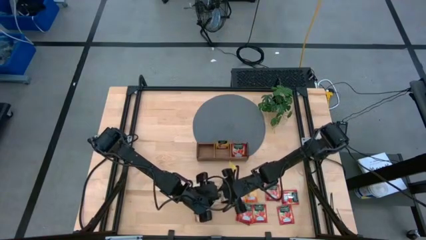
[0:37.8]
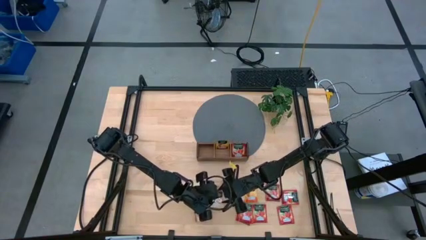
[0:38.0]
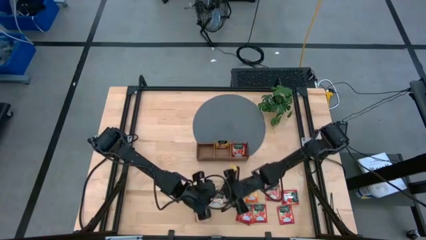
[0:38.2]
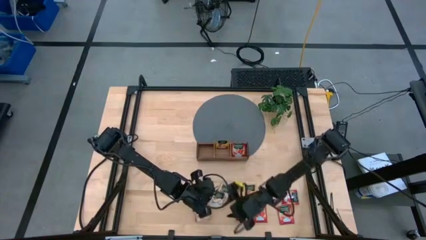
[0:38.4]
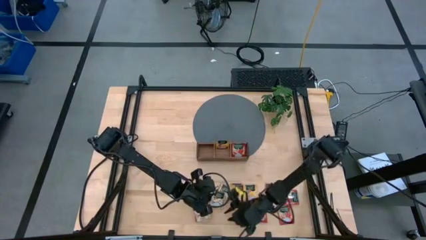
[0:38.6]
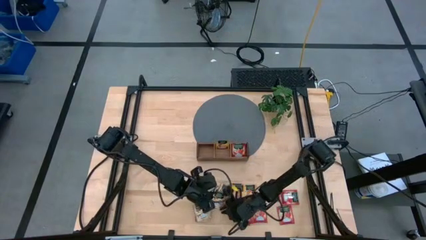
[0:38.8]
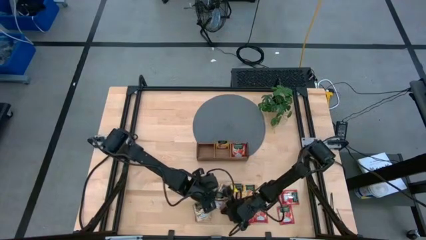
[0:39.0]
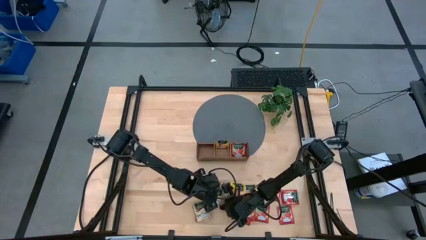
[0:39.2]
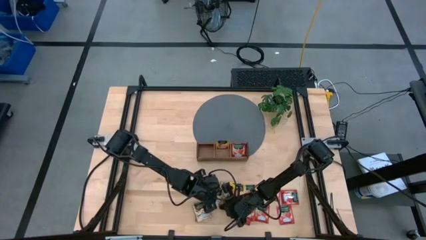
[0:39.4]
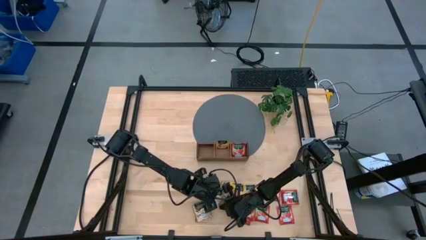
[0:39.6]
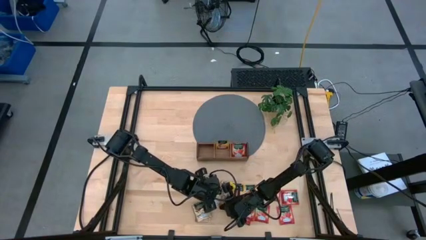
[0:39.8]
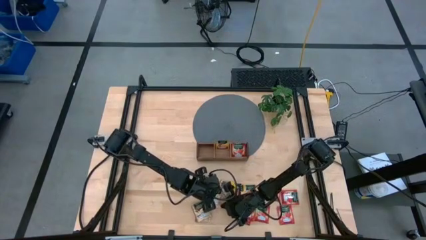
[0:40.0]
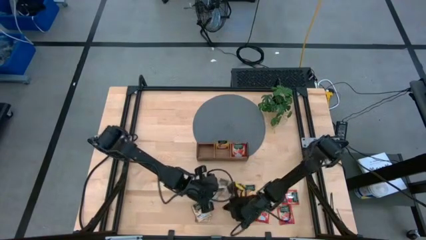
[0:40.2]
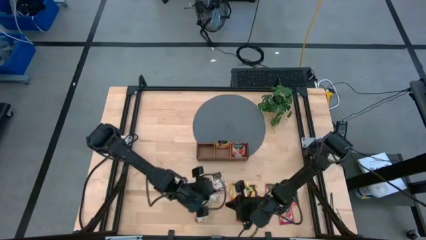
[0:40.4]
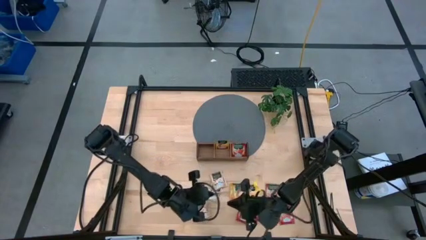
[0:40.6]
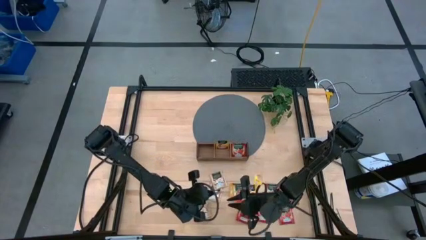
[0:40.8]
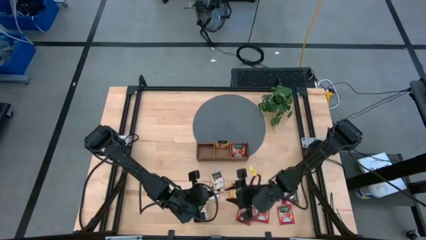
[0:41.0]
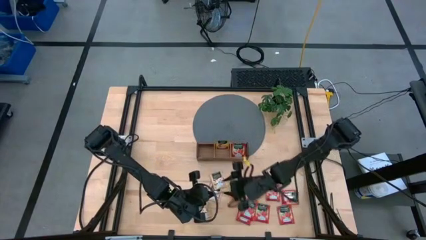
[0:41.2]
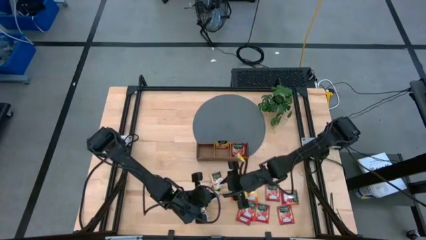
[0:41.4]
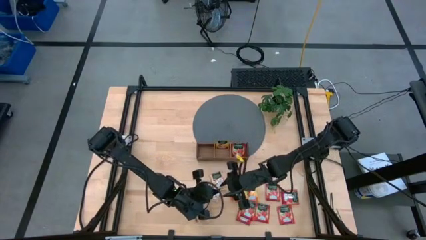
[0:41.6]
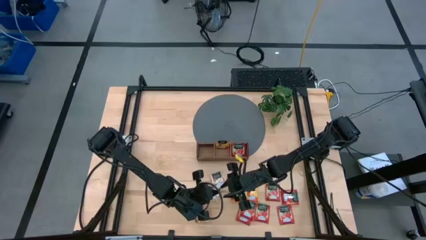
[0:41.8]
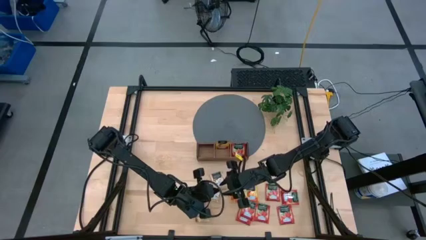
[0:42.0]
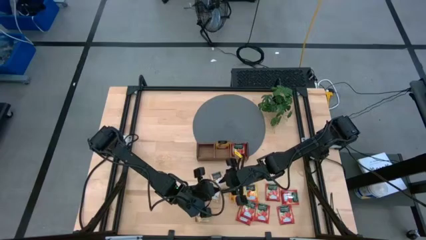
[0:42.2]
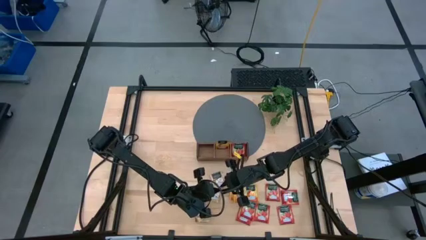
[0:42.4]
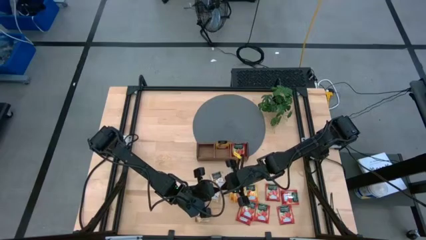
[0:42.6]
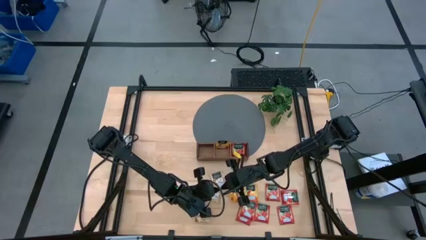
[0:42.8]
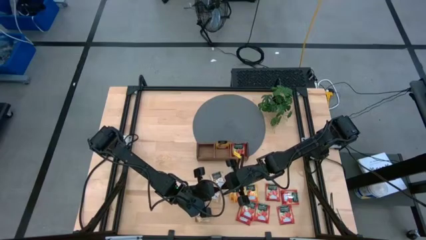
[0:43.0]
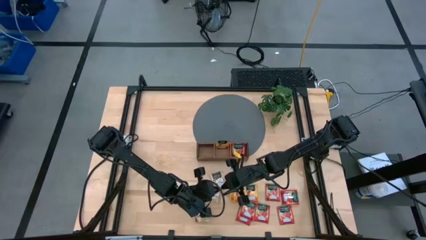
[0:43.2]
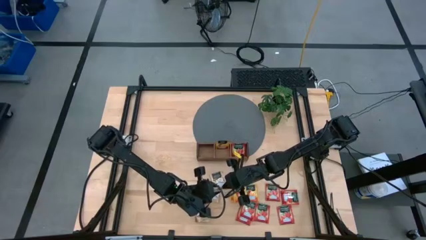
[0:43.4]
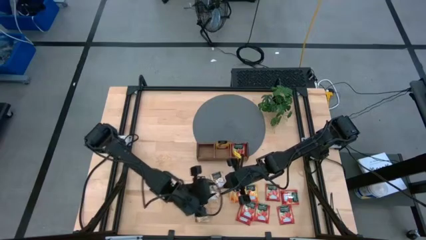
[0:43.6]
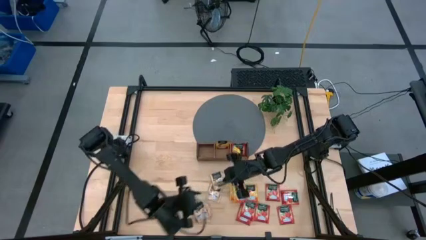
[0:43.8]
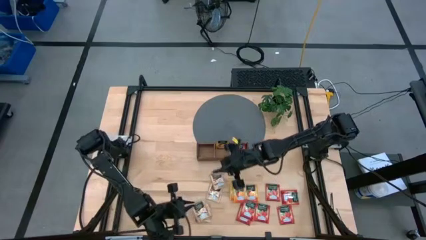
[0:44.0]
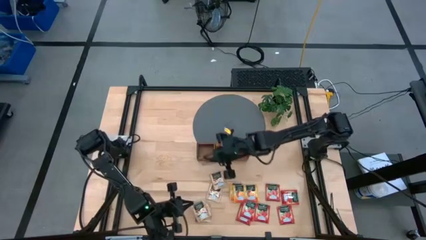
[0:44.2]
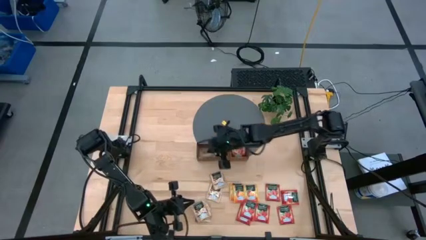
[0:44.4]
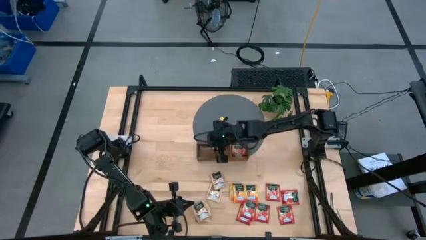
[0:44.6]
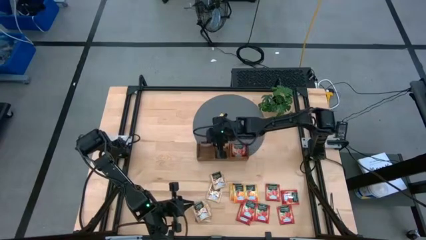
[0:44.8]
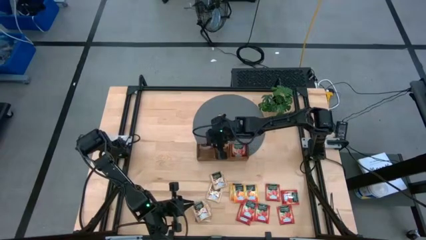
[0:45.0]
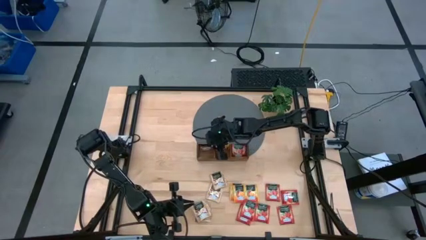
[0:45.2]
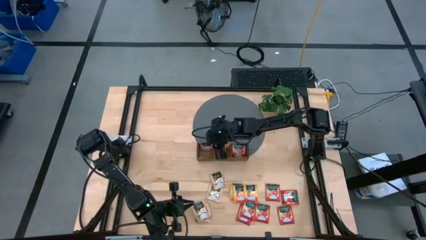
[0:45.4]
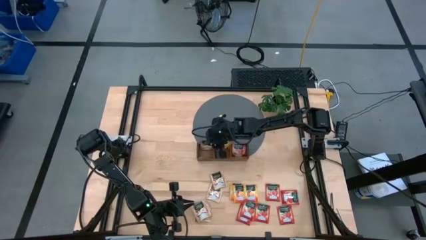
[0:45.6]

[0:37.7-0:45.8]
Task: Pick & Place Tea
Put the brown tea bag into the left wooden organizer

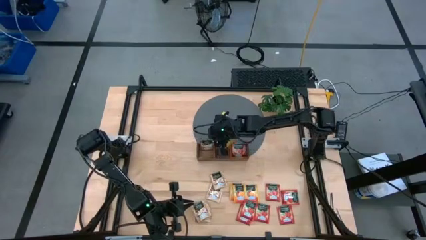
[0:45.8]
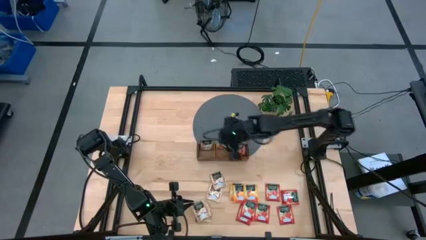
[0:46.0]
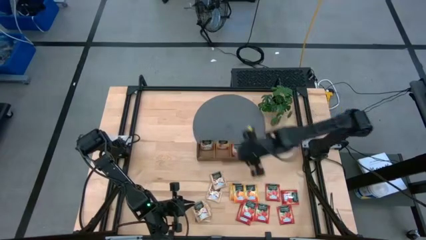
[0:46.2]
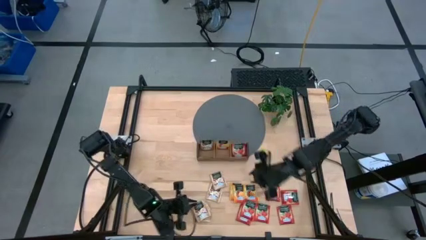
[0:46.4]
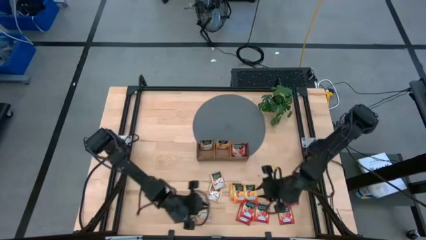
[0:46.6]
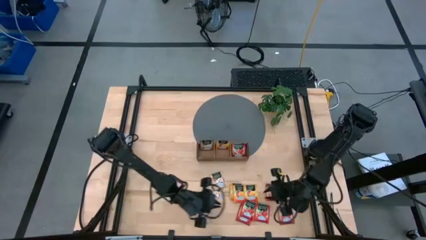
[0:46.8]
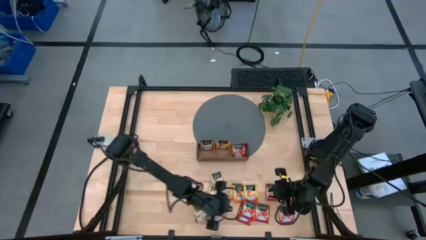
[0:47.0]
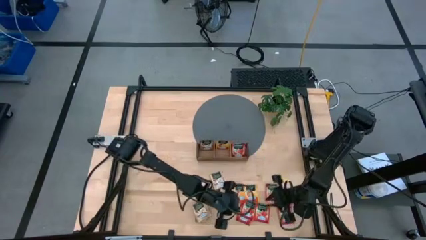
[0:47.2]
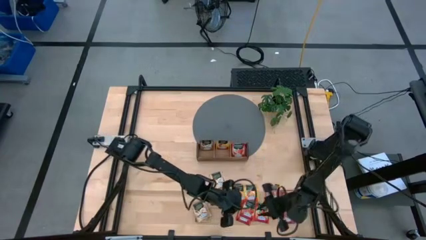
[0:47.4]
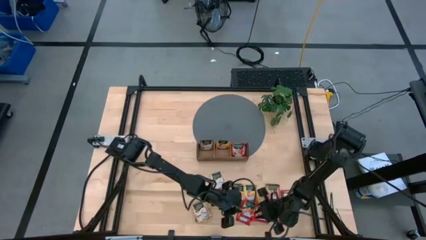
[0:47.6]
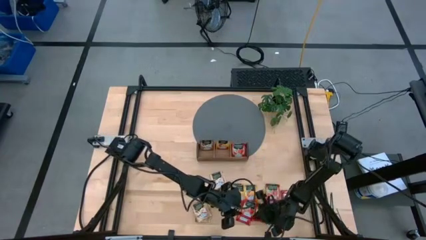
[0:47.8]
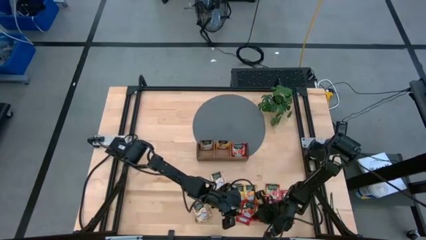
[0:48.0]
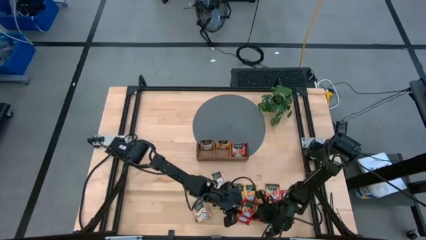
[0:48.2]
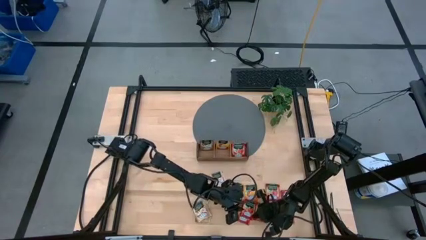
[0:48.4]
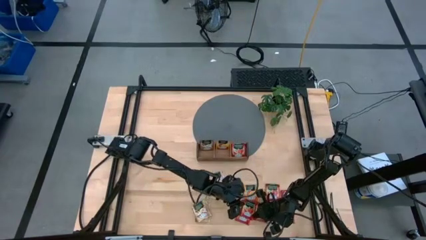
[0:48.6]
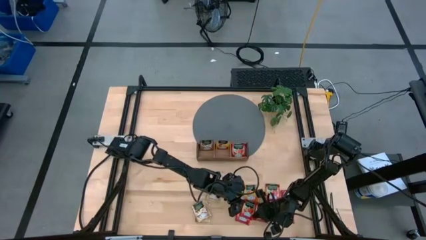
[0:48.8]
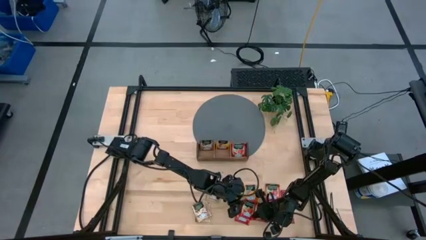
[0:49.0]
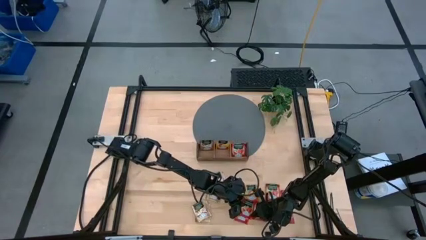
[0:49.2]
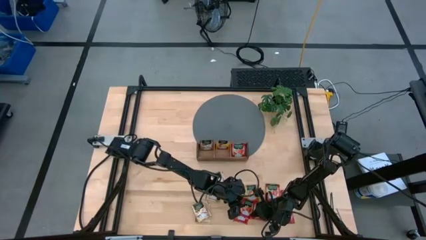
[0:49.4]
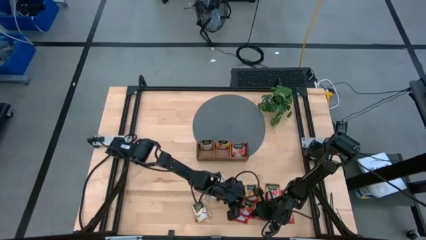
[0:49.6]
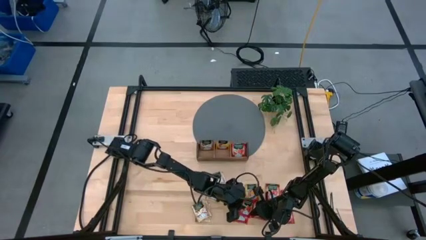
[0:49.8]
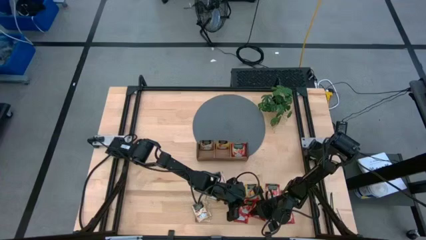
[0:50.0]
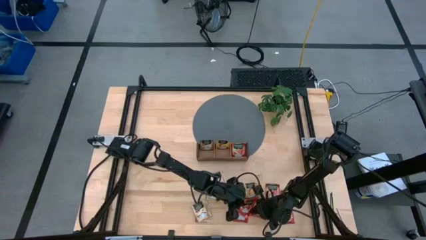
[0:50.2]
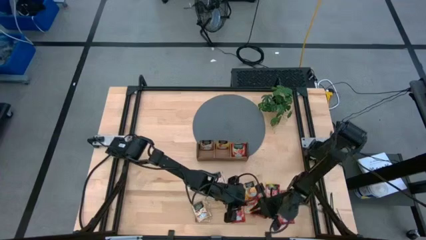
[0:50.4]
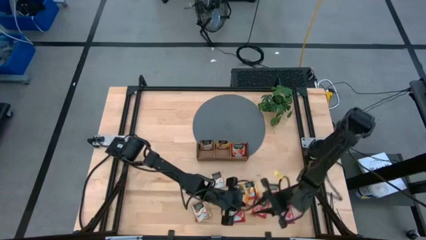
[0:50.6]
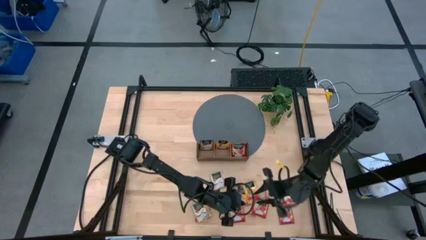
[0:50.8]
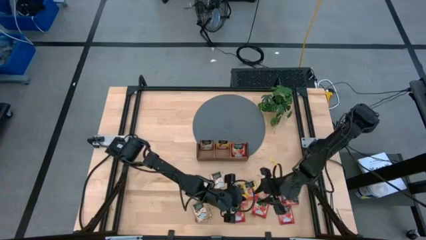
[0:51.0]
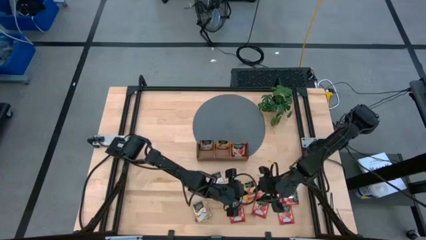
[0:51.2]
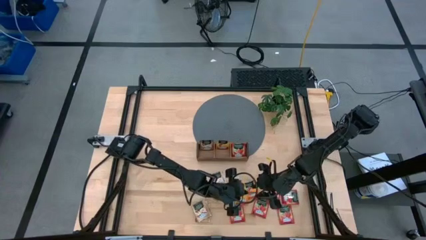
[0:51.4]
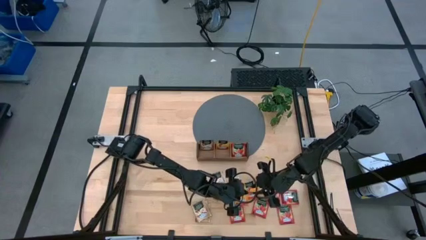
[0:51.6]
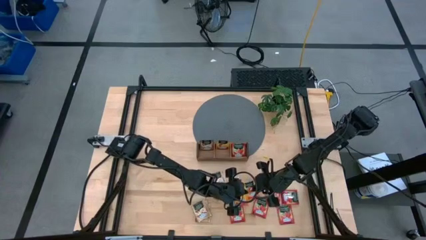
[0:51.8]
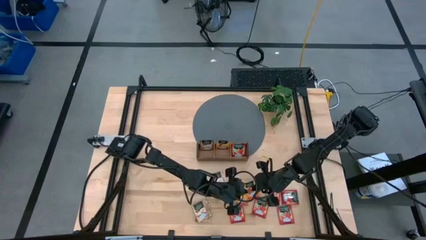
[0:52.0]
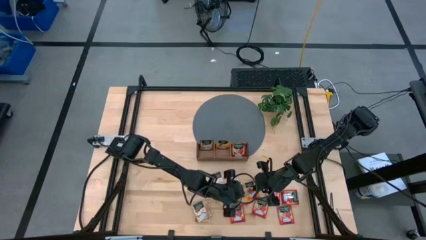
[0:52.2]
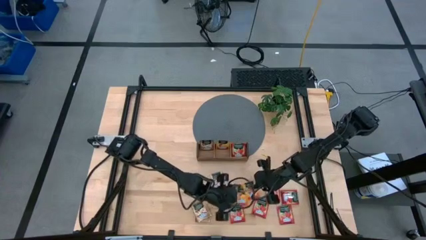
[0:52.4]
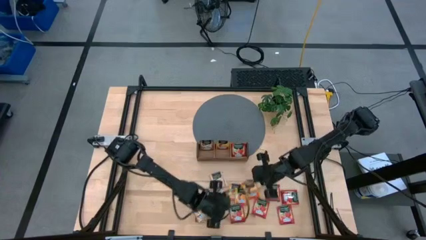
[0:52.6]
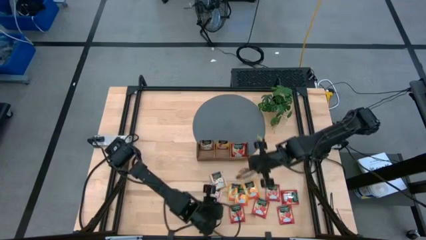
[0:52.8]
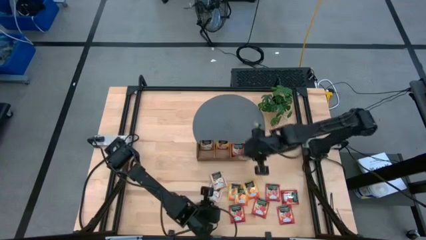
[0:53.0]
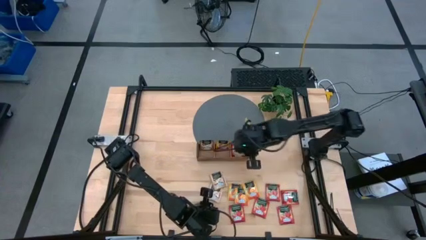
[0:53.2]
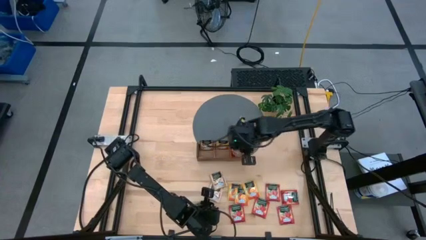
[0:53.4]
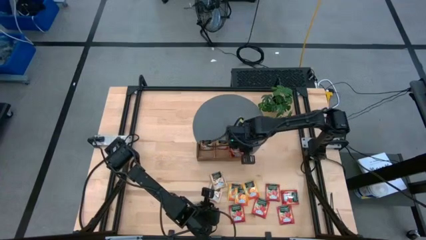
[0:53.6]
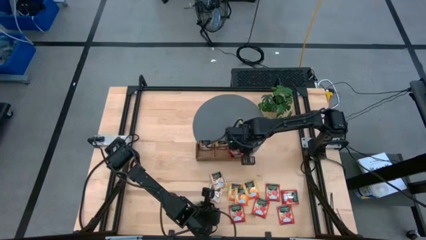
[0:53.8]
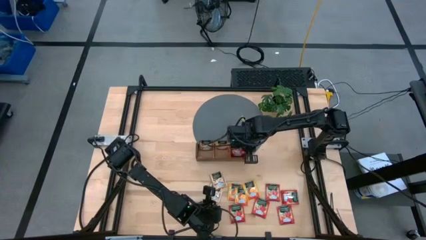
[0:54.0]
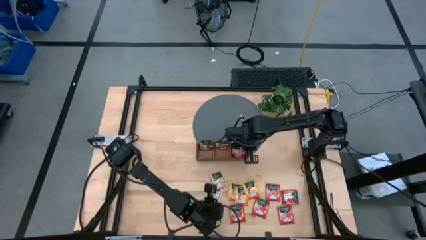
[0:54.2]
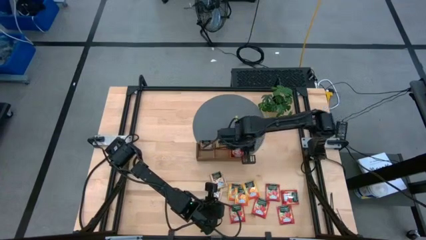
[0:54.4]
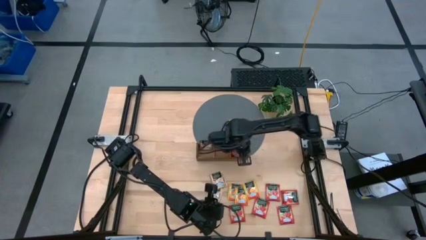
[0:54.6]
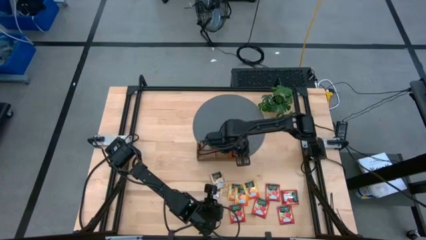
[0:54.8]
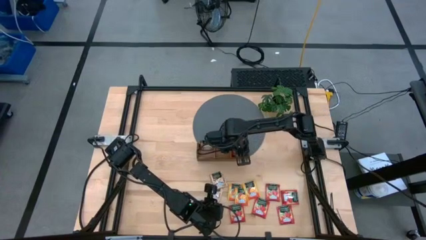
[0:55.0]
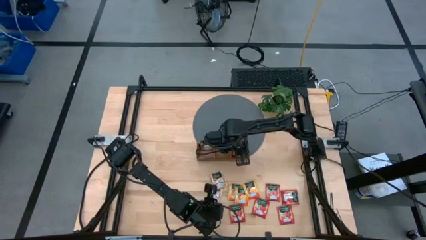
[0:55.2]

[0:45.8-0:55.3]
Put the red tea bag into the right wooden organizer
